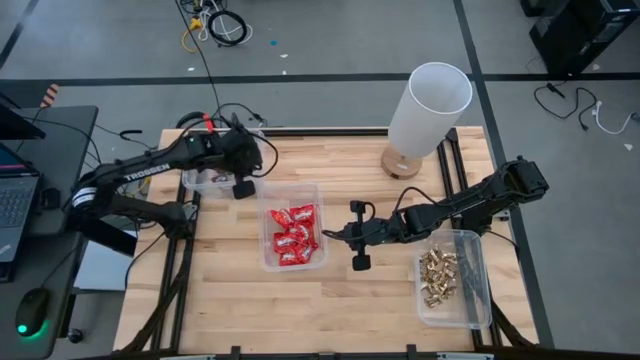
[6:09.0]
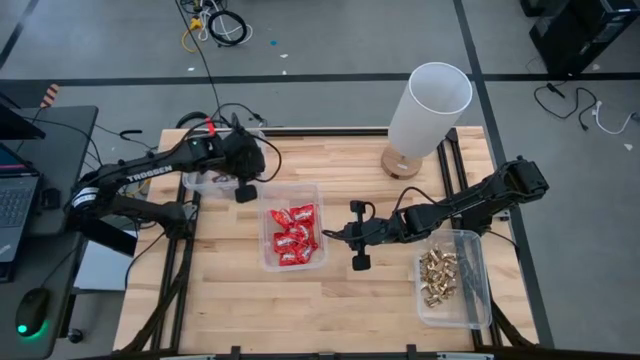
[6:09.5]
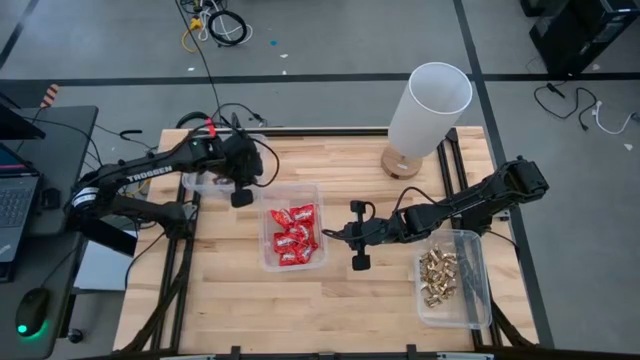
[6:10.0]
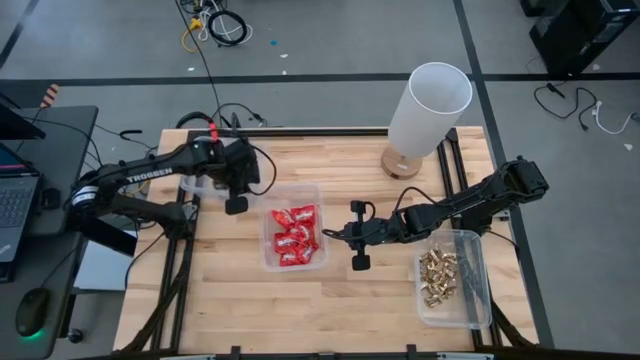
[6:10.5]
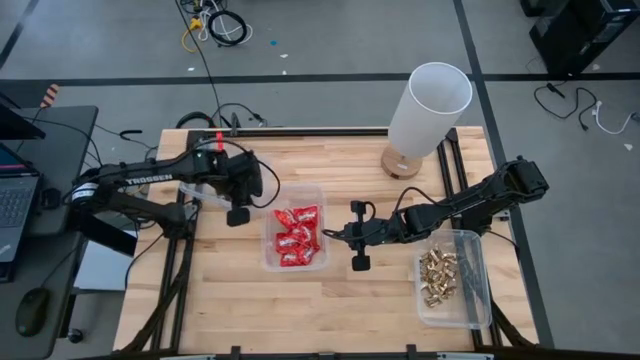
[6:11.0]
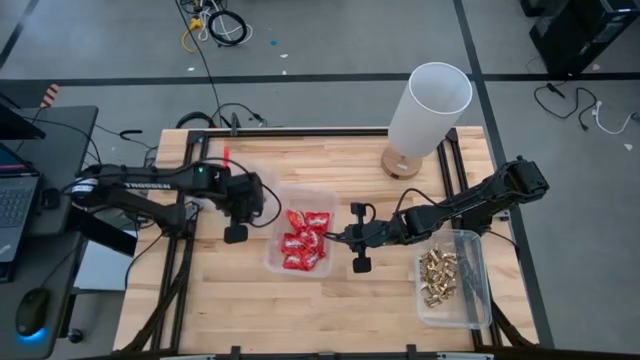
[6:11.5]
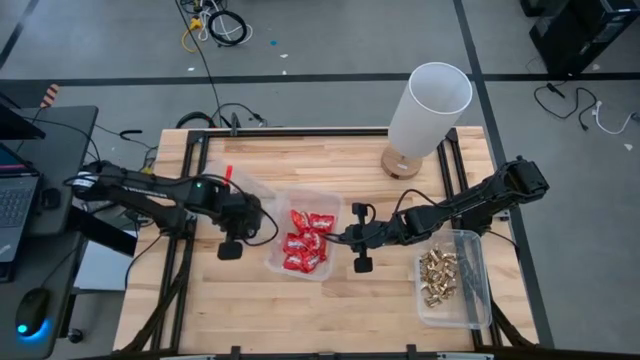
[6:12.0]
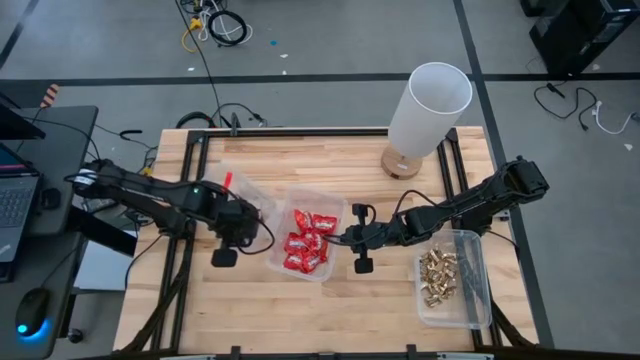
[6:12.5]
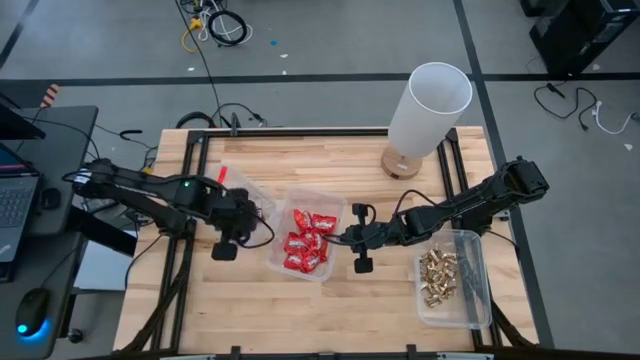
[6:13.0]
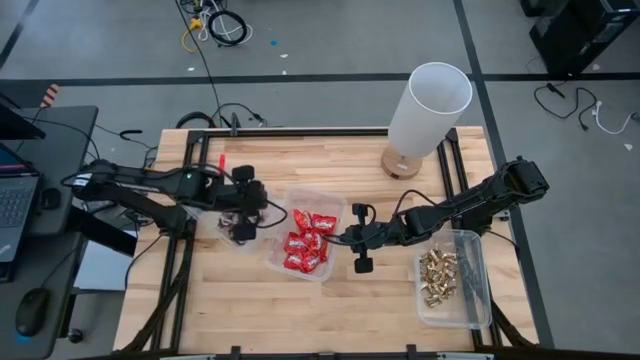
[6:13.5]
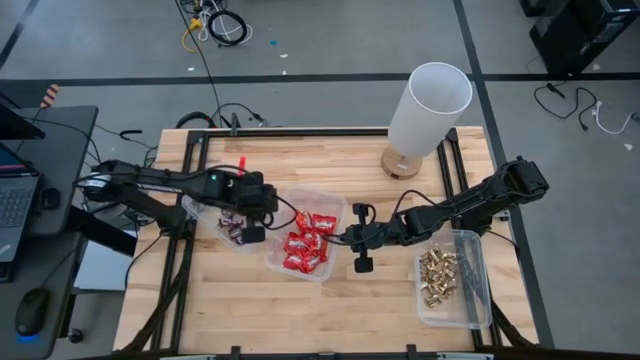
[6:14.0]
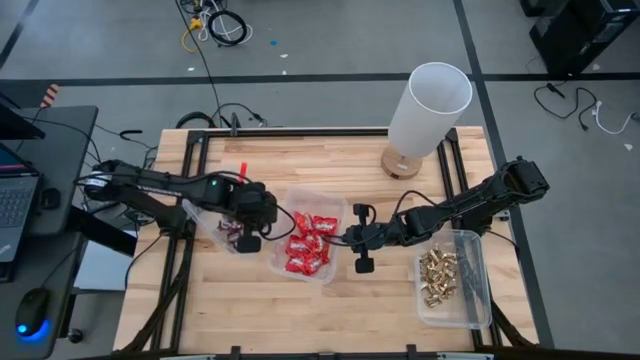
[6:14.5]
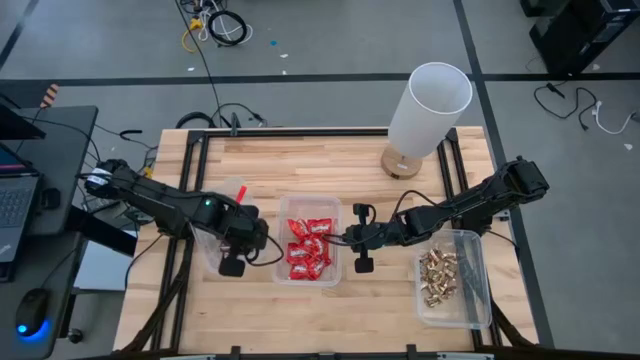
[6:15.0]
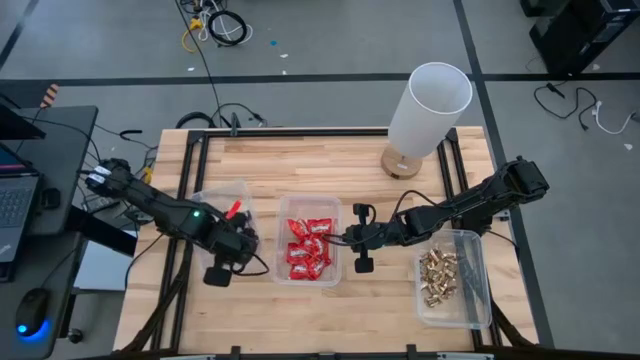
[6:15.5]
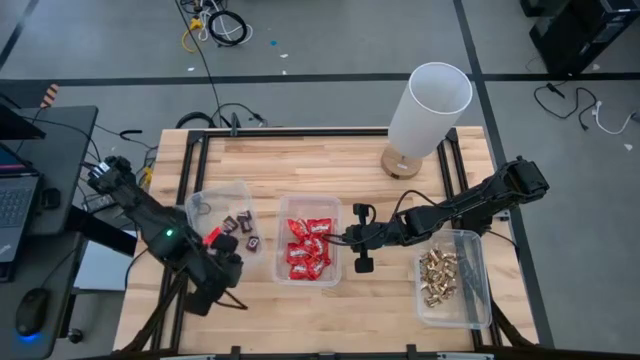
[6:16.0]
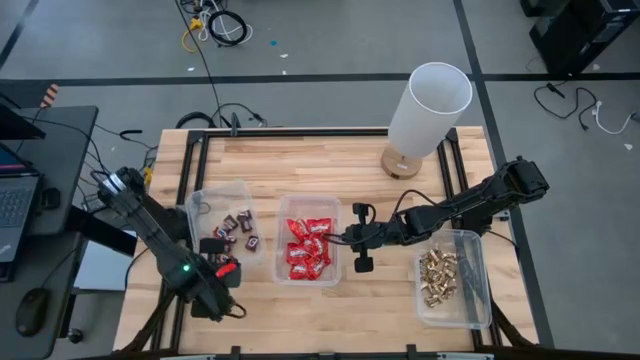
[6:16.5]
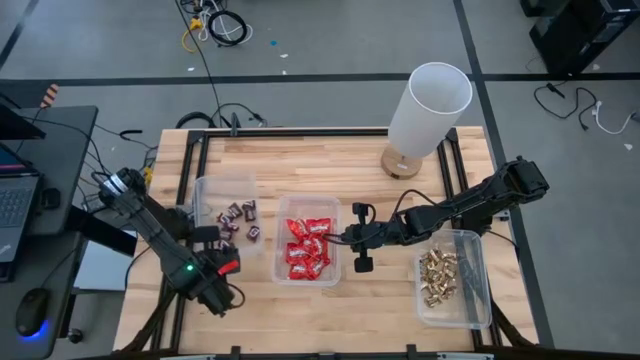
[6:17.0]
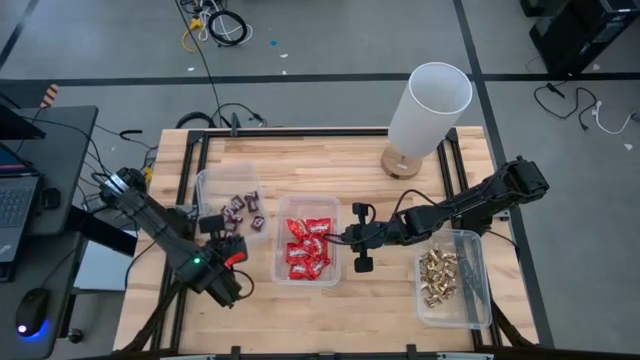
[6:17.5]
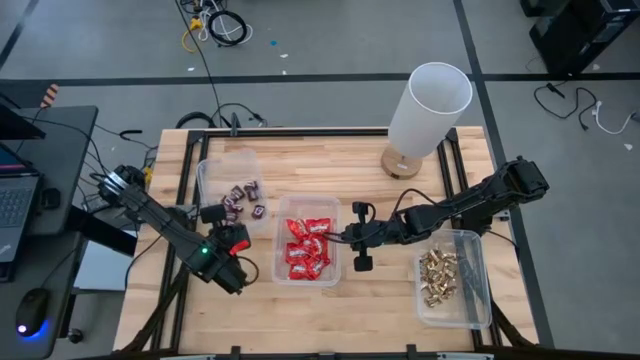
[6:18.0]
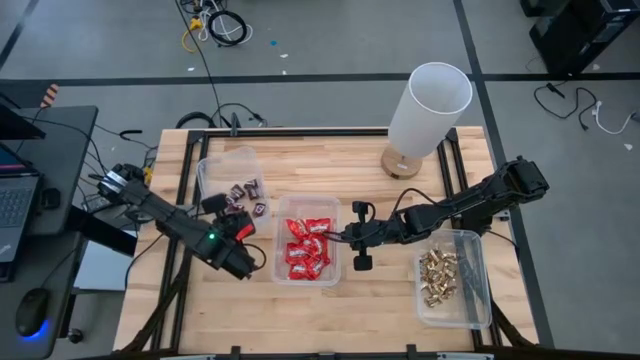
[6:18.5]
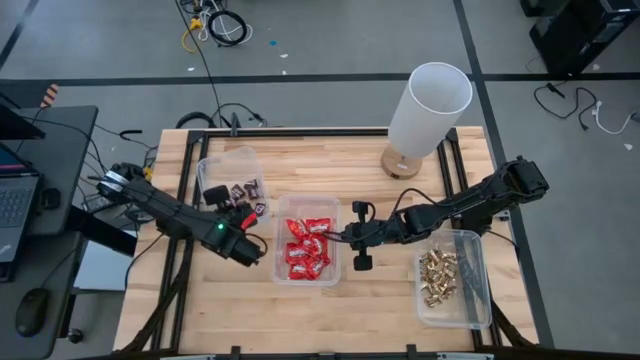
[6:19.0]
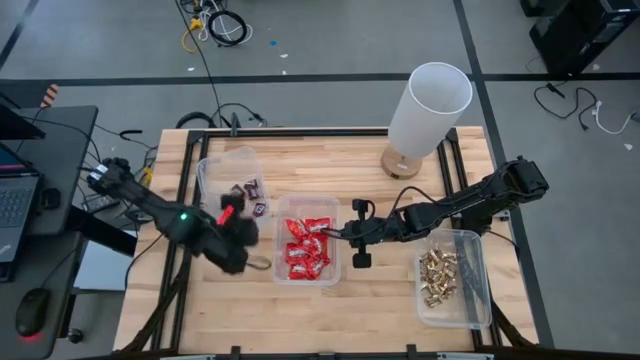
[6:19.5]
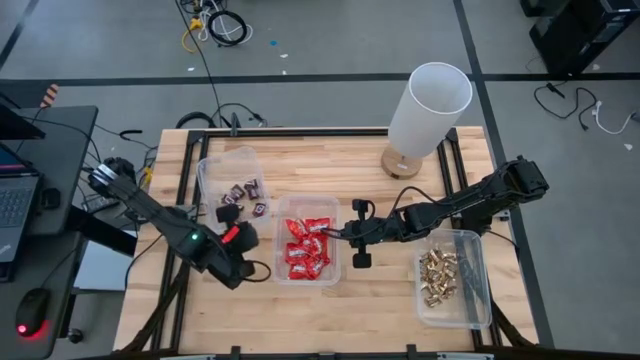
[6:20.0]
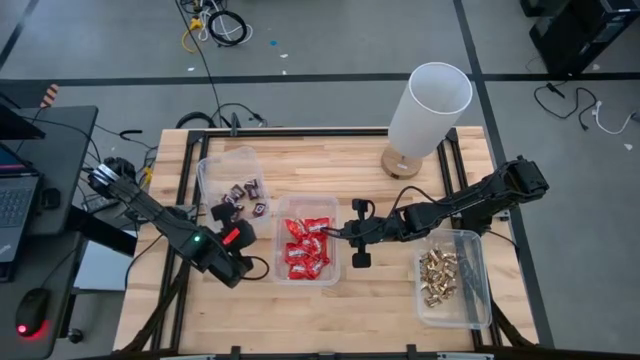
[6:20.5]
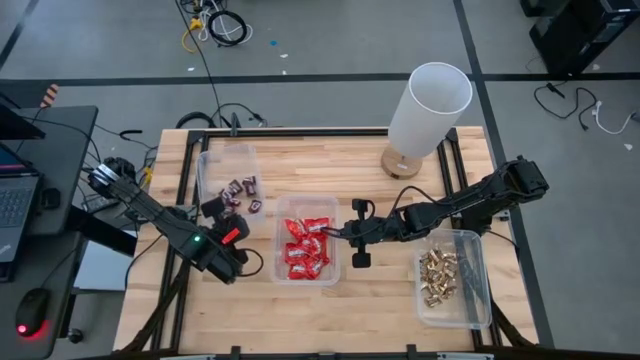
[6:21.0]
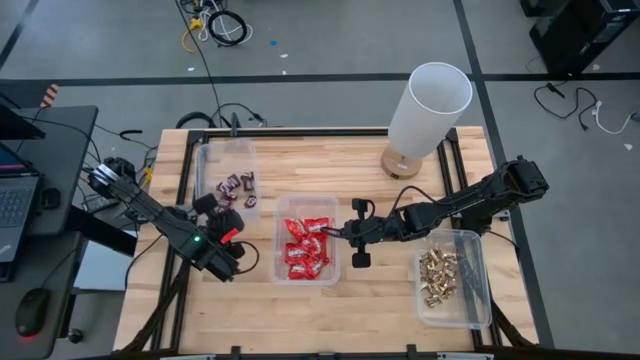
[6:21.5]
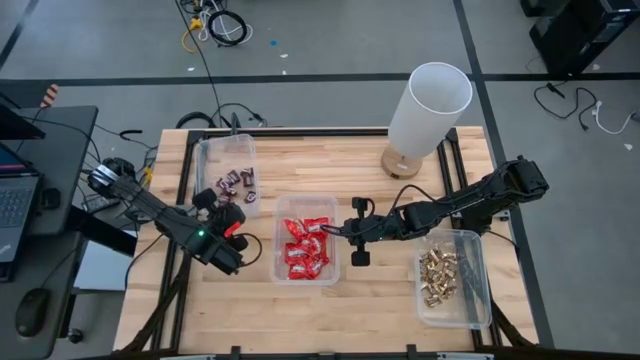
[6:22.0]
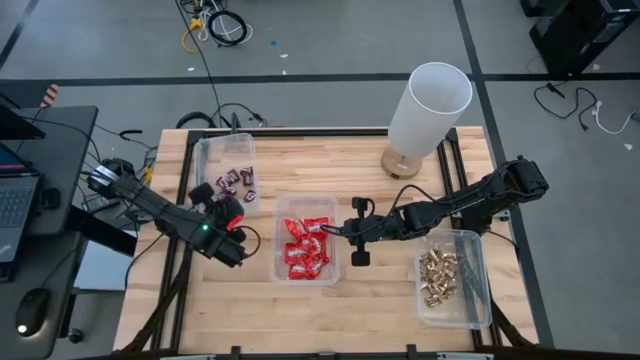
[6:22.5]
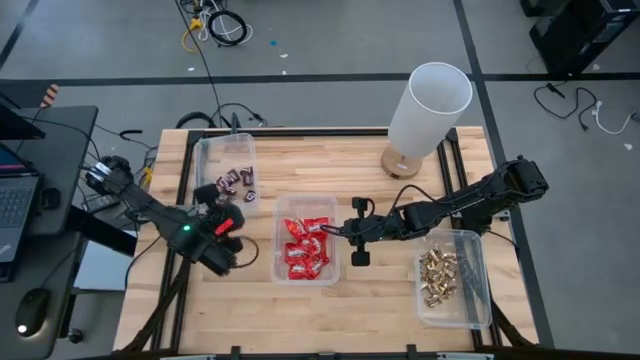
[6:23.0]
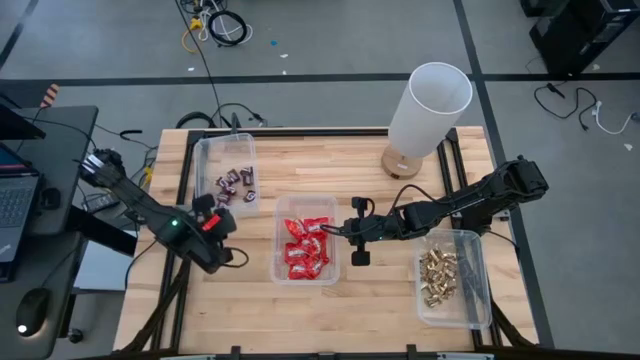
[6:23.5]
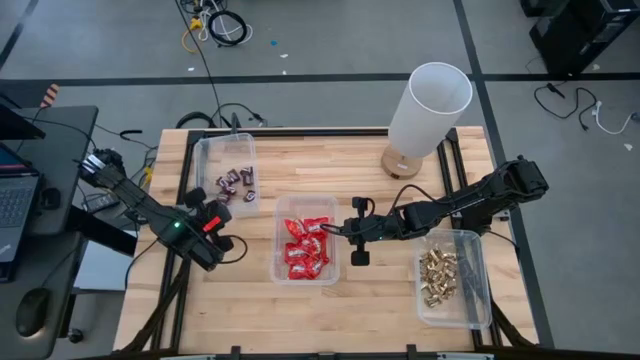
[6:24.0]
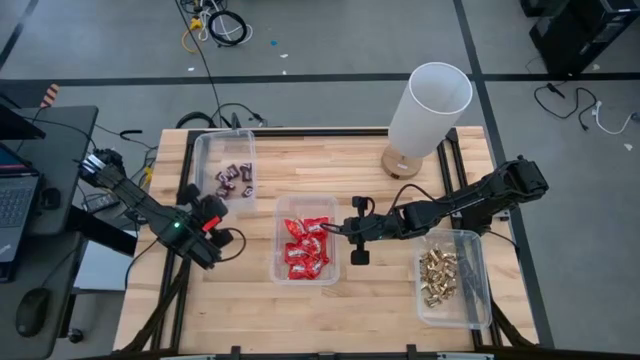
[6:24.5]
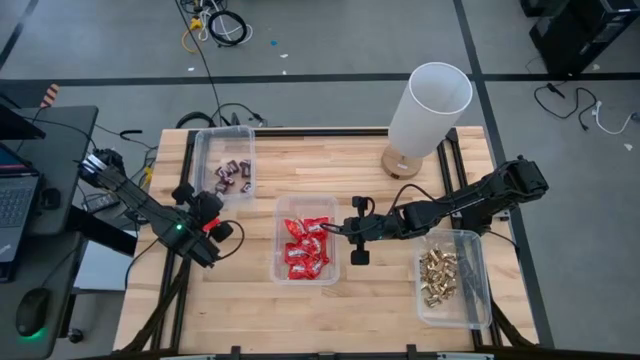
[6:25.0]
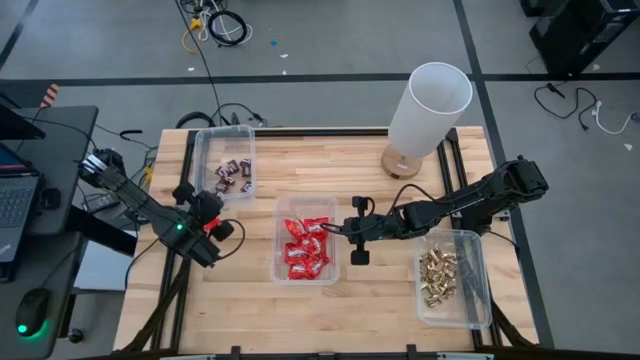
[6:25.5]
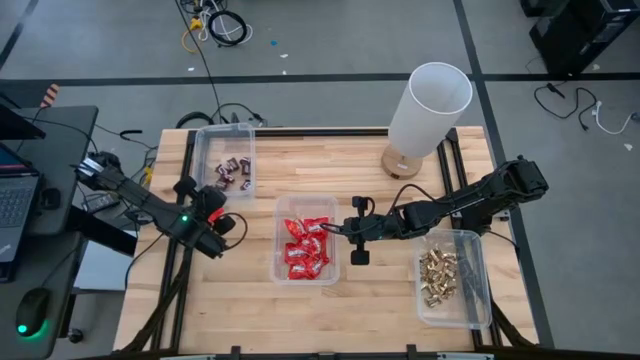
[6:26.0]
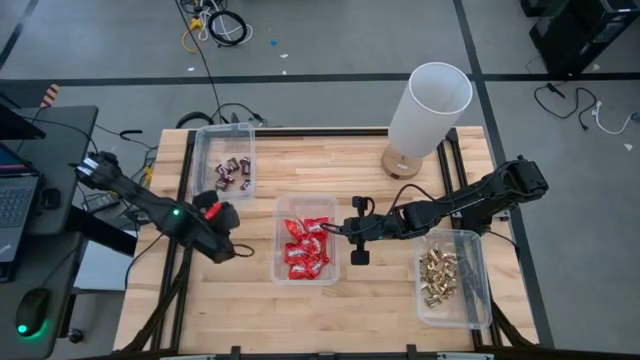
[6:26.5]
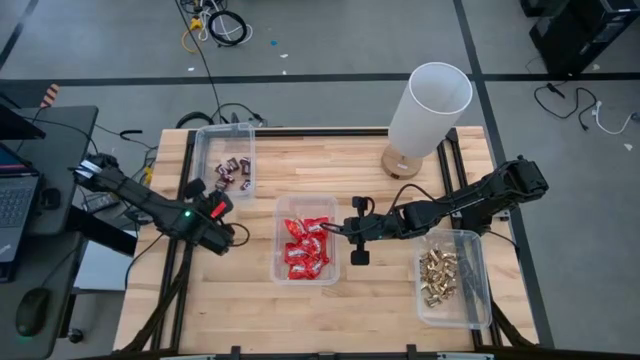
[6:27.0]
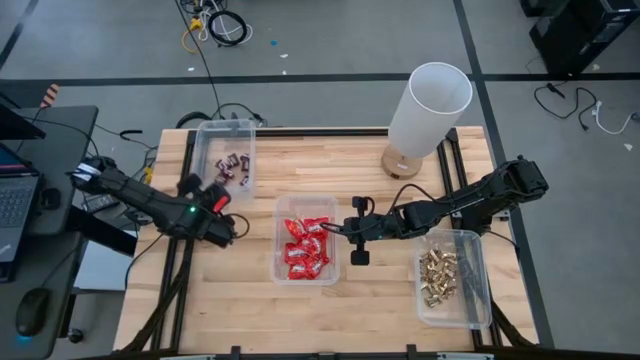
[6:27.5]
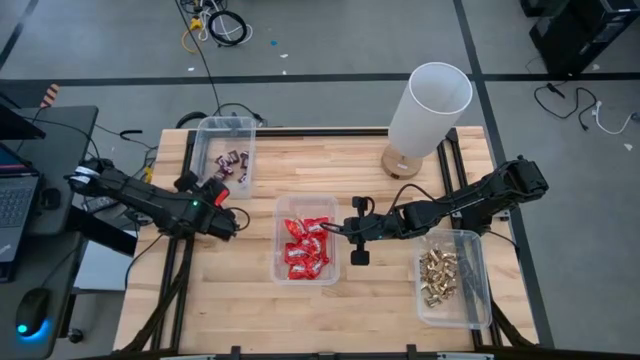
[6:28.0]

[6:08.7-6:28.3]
Task: Sort candy
Adjust the top left transparent bin
